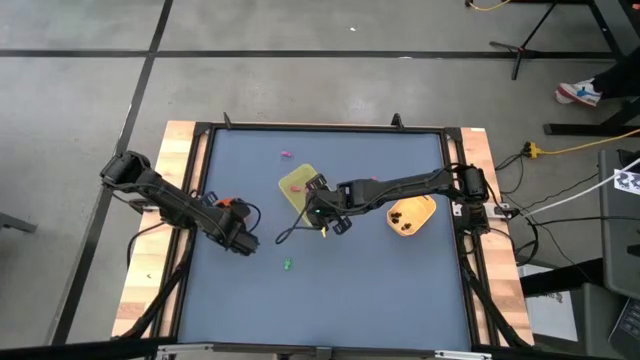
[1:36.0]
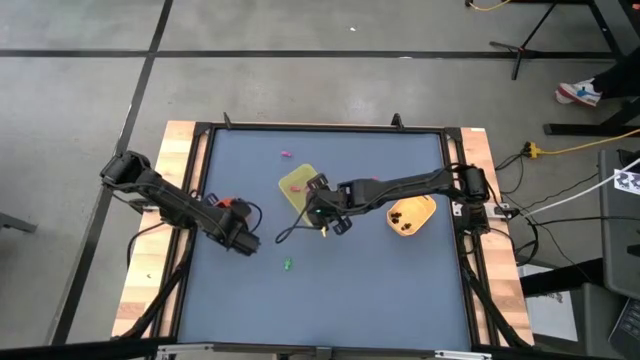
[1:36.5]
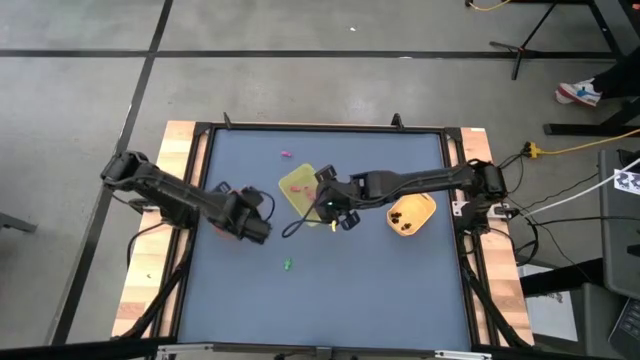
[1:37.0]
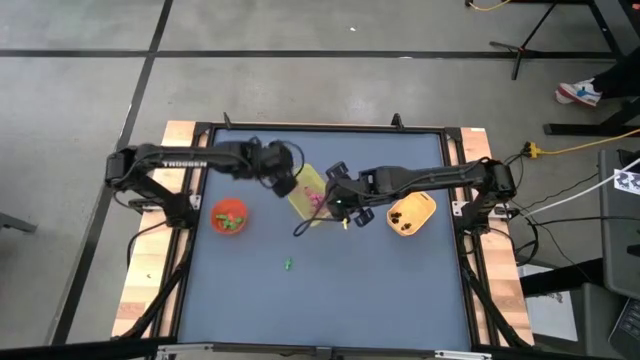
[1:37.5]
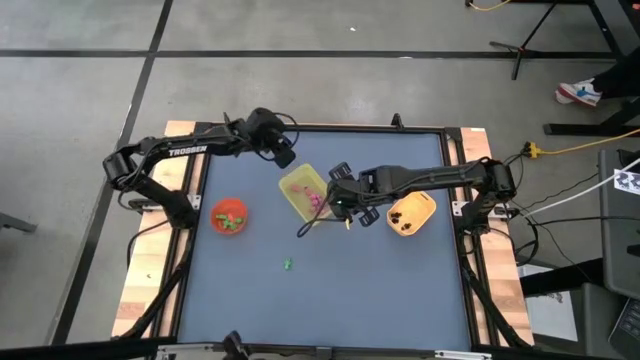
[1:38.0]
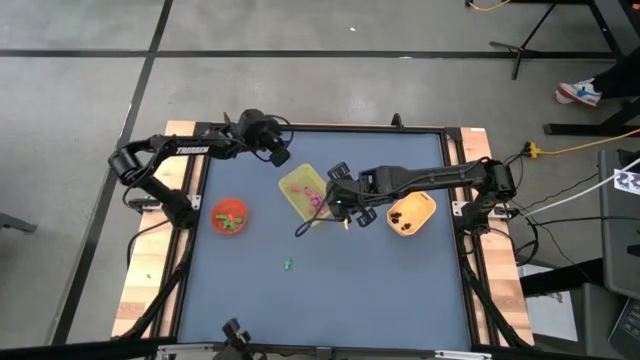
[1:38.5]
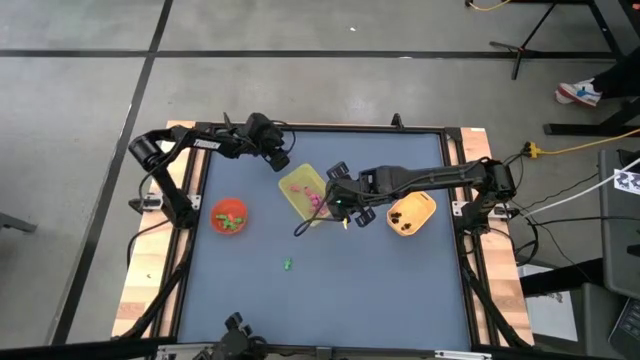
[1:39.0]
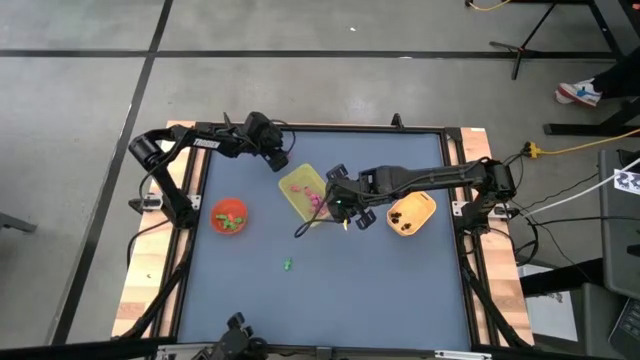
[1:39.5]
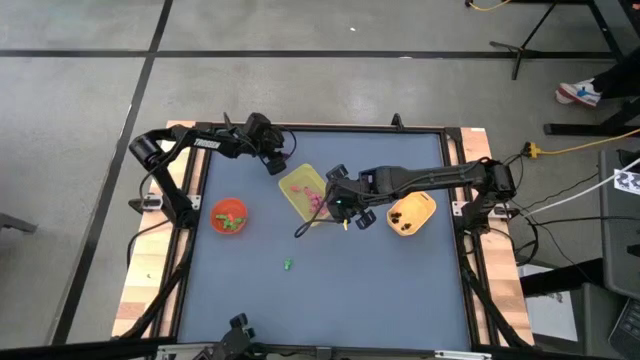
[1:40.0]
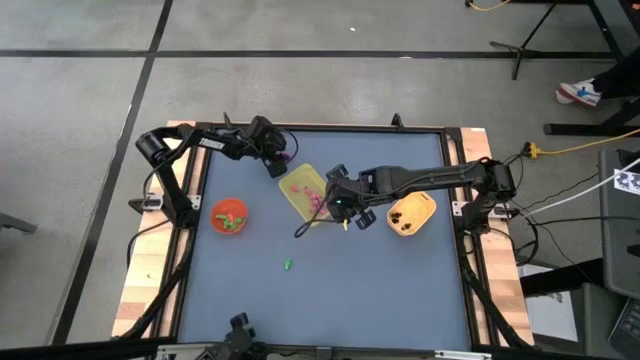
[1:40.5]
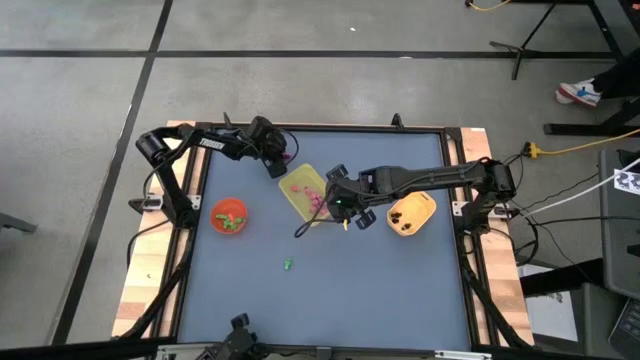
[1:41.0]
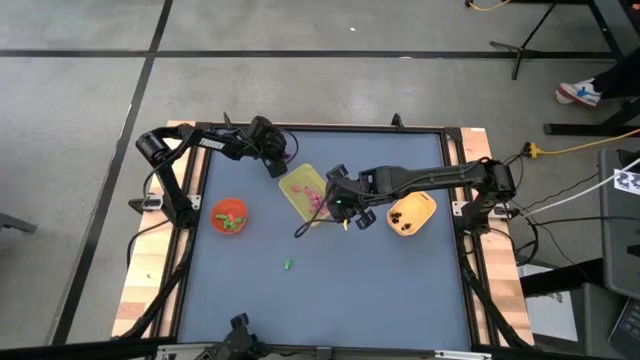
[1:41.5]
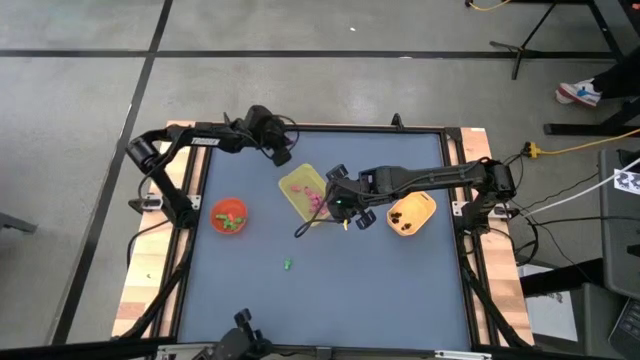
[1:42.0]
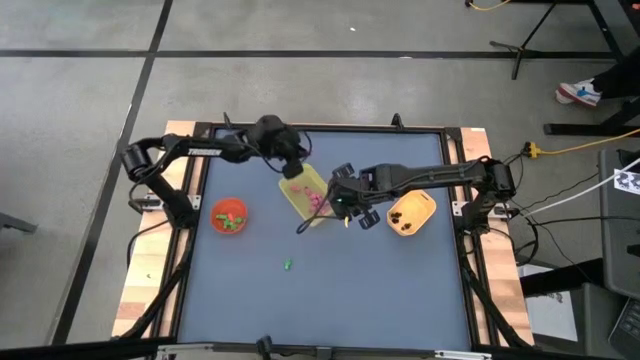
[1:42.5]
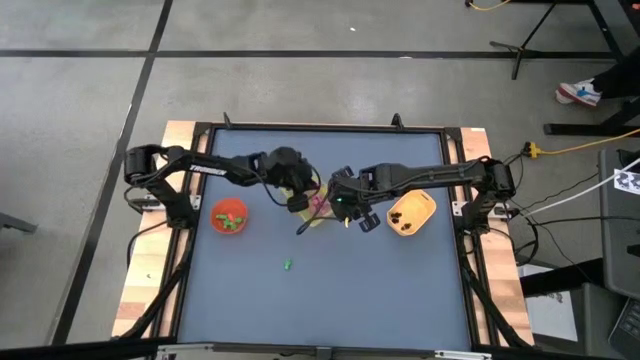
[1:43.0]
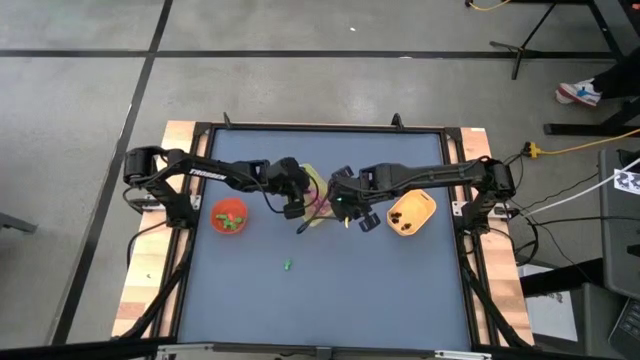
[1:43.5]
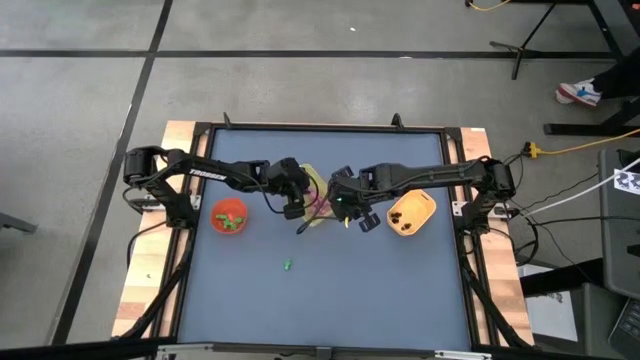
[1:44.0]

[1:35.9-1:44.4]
Task: Sort Halloween decoration
Put the pink skeleton toy into the yellow bin

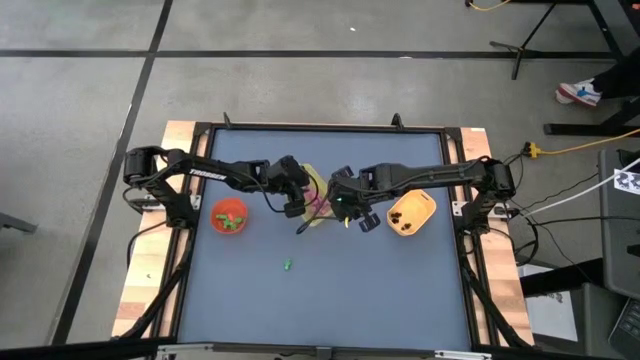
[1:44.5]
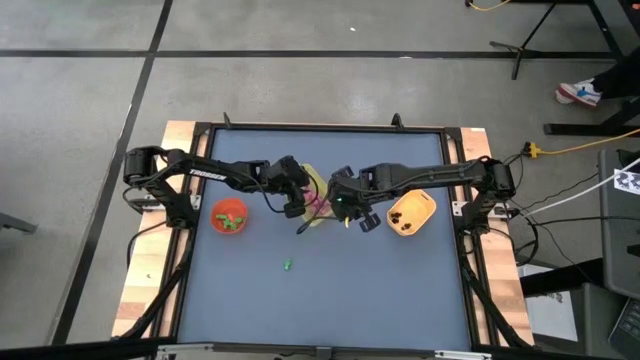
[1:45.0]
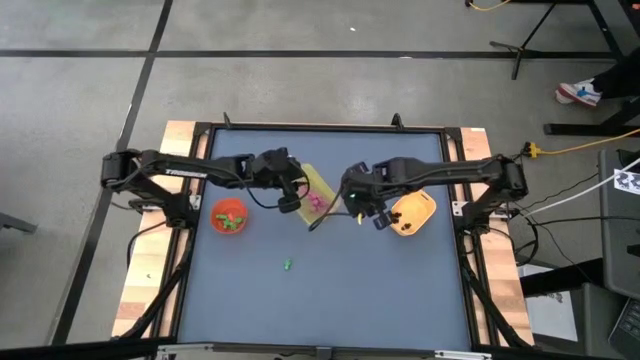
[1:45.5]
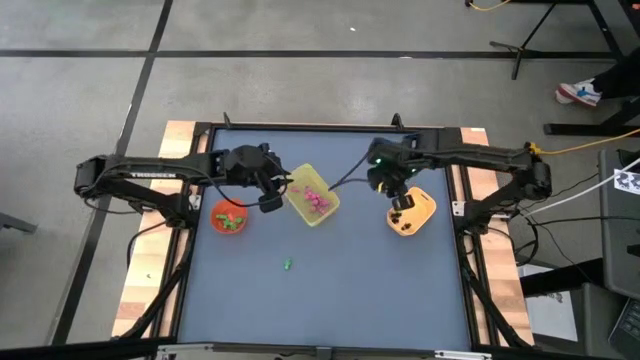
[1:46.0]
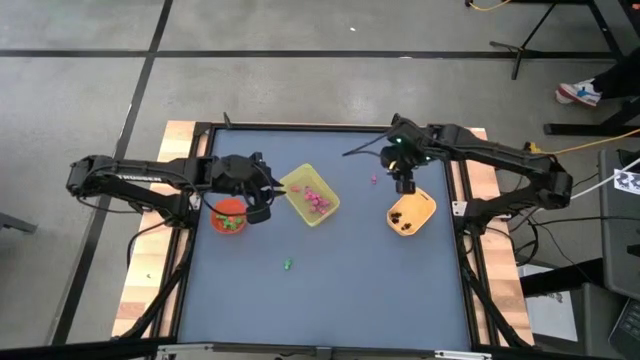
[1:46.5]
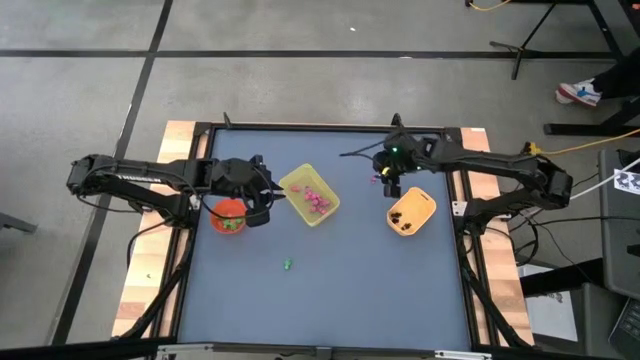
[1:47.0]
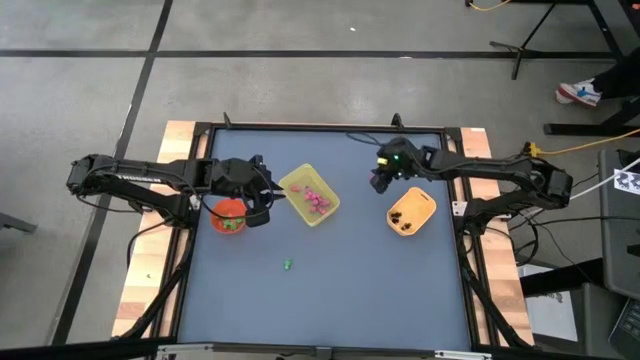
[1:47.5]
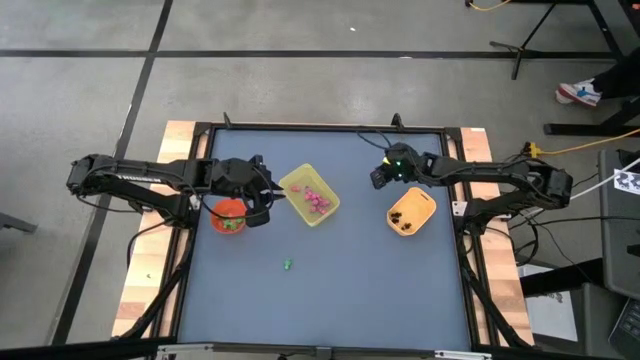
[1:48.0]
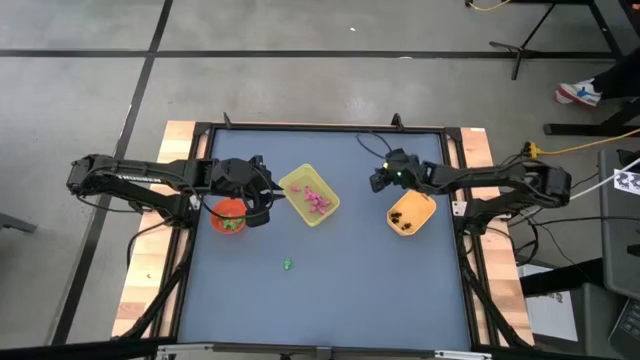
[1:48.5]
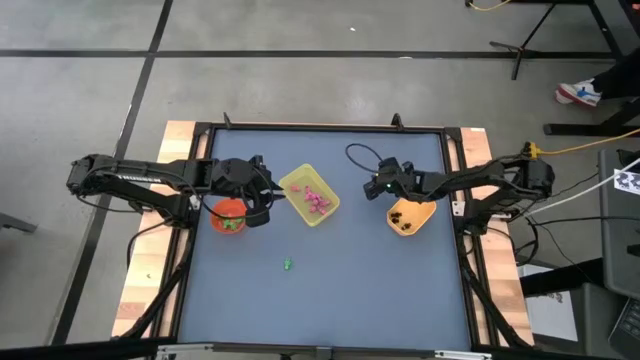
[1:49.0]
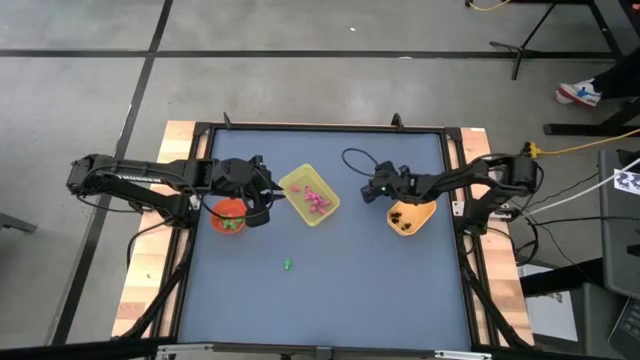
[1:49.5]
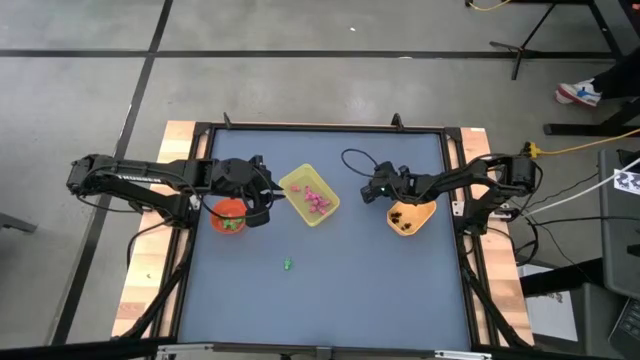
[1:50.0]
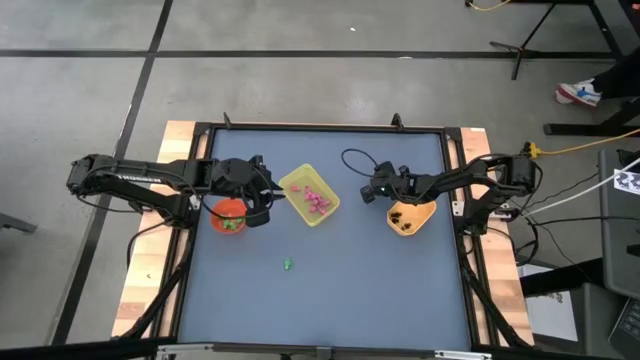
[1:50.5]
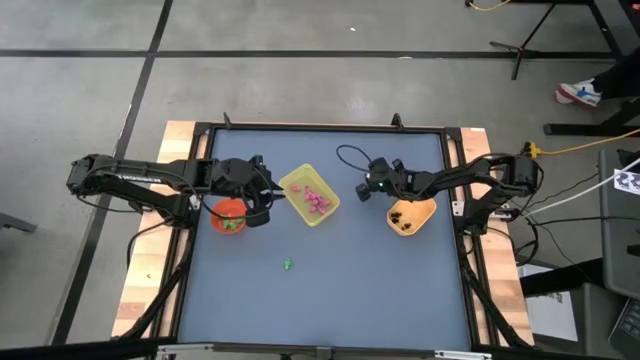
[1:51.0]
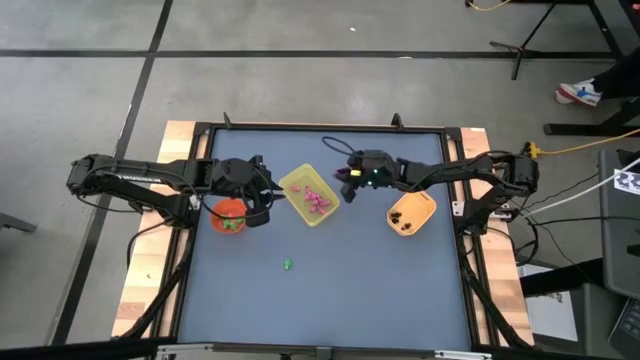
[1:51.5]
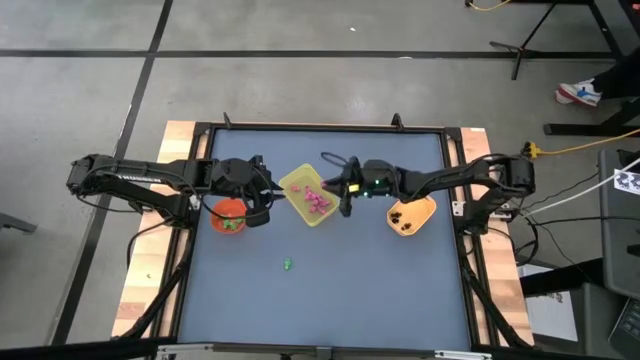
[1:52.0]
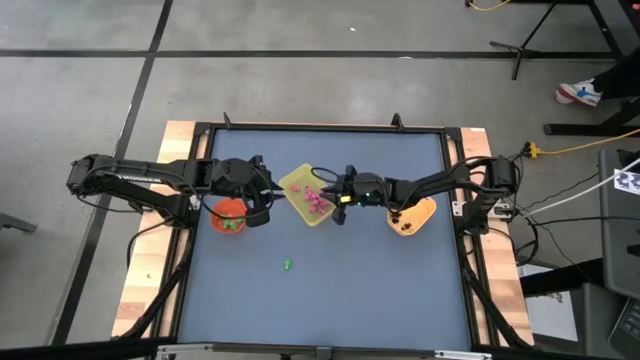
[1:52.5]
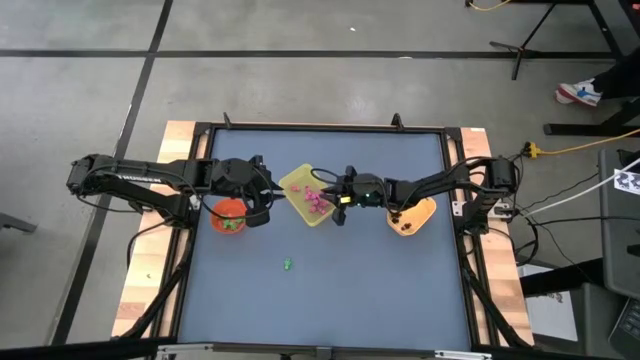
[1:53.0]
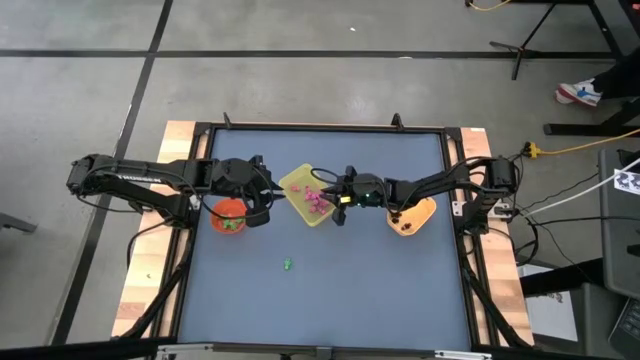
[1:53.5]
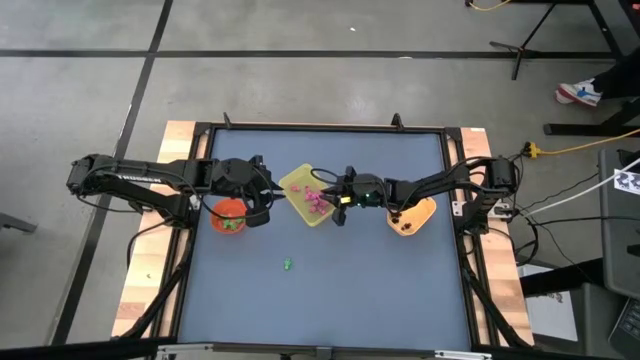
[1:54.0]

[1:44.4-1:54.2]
Put the pink skeleton toy into the yellow bin

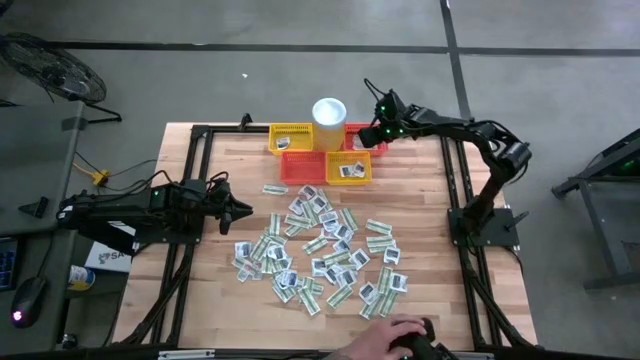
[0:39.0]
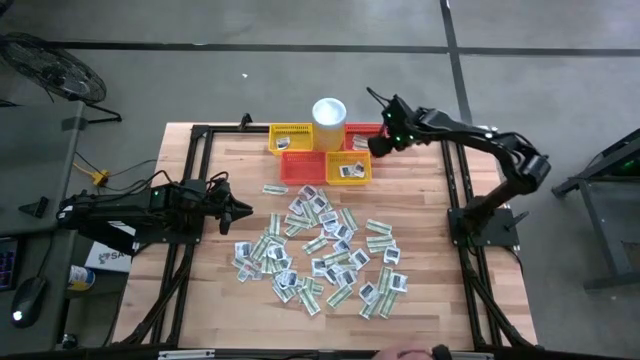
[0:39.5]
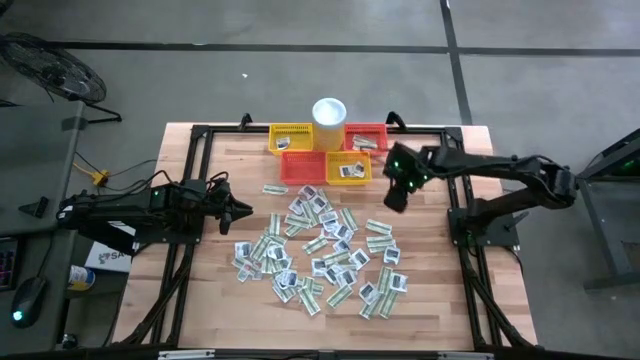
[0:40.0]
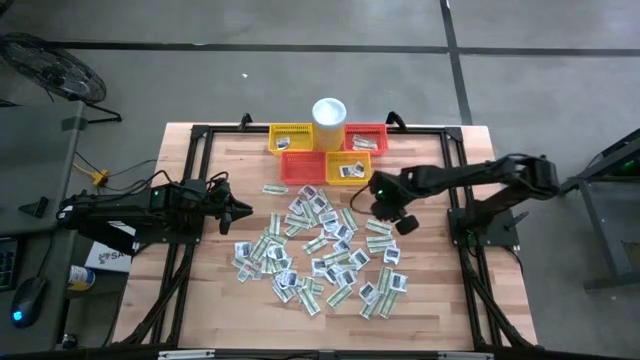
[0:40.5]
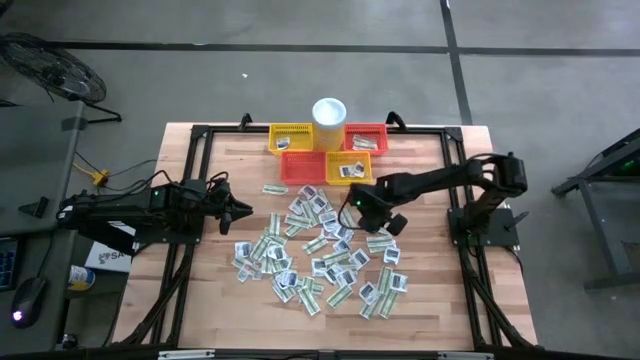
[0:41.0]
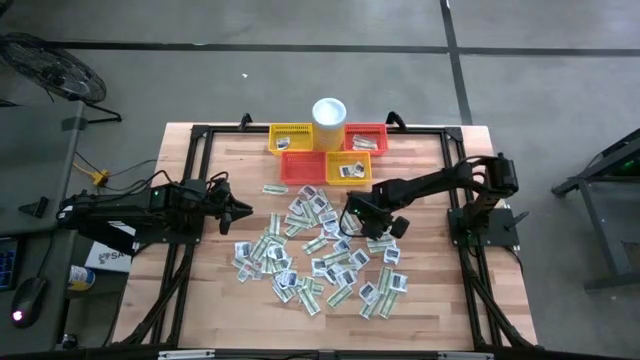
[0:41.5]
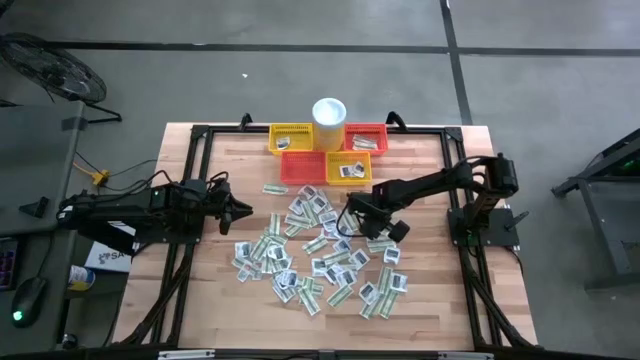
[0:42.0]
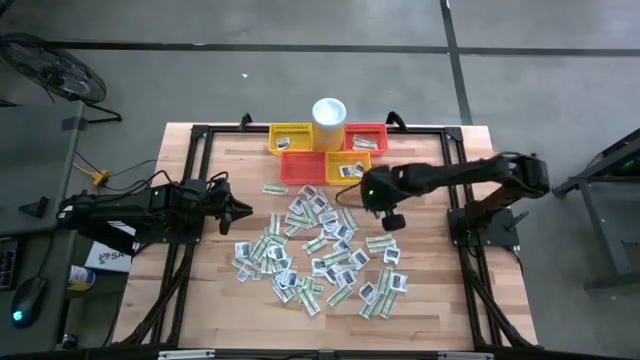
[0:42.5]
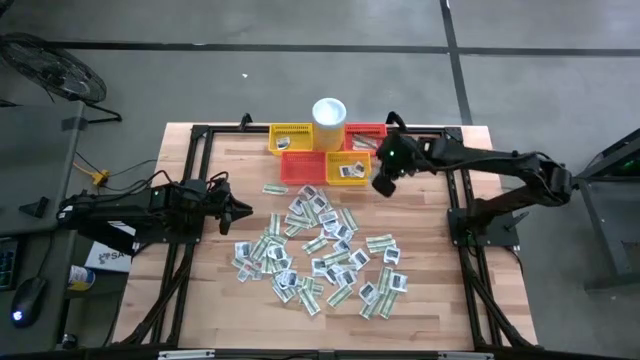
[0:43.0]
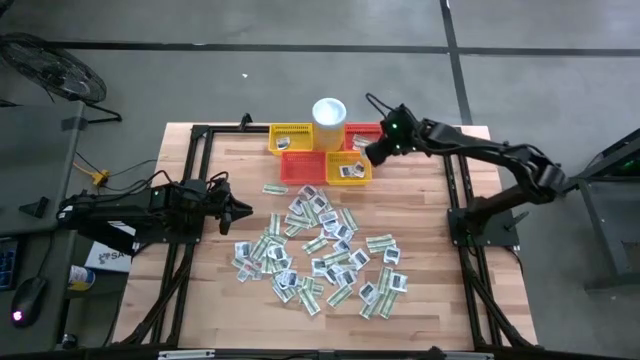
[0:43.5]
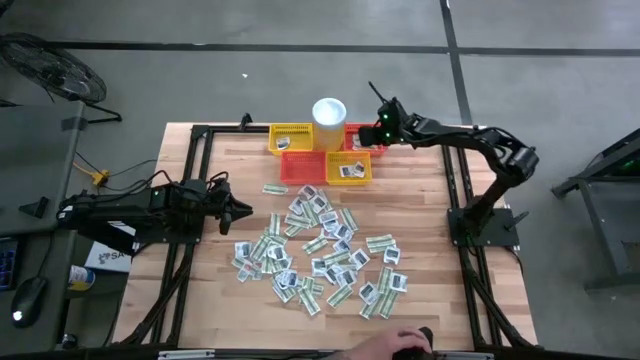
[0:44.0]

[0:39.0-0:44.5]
Task: Pick & Place First Aid Supplies
Put the green bandage pack into the top orange basket
